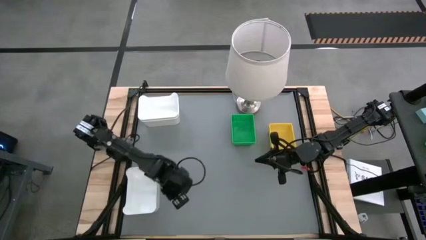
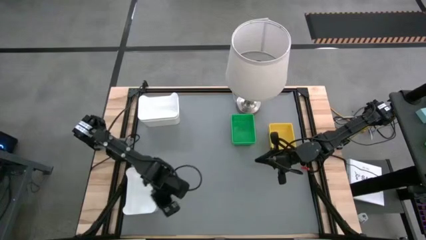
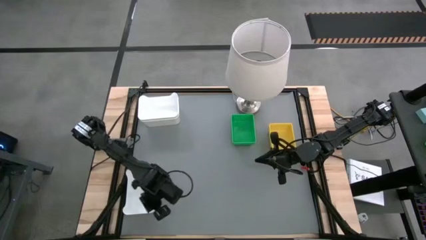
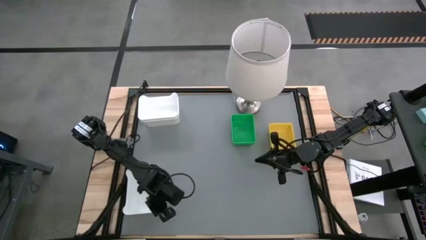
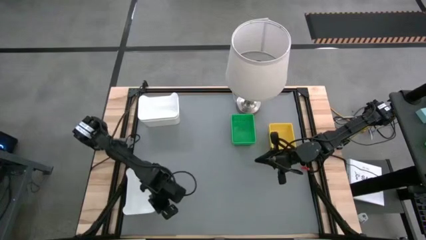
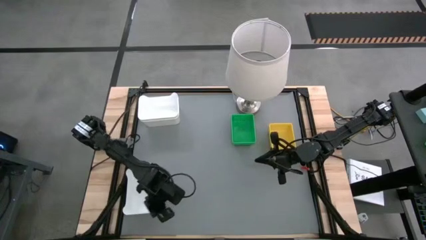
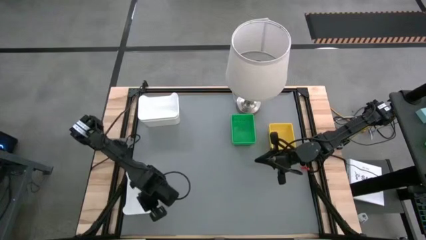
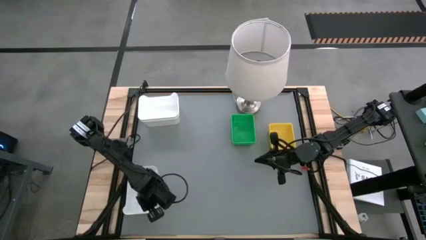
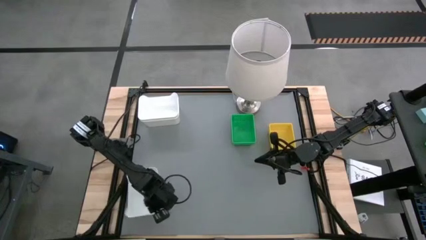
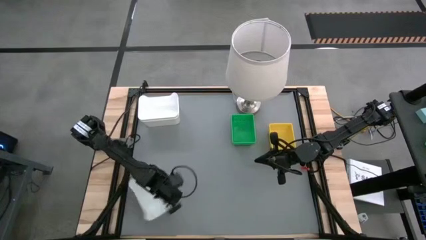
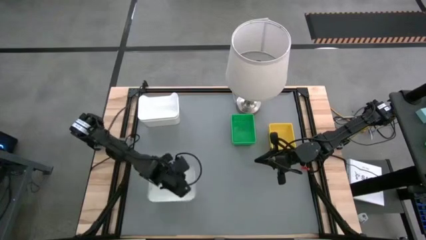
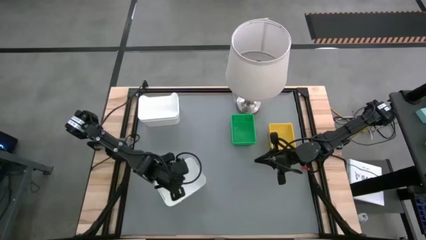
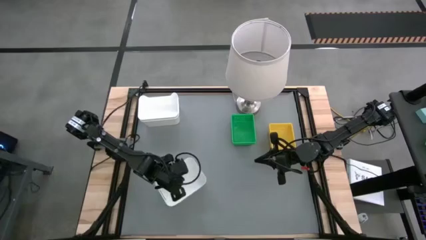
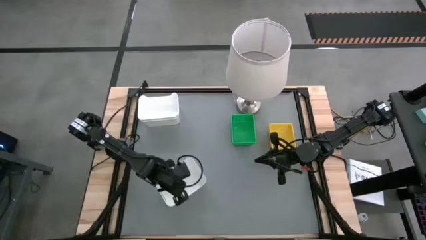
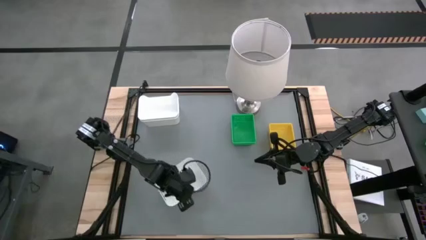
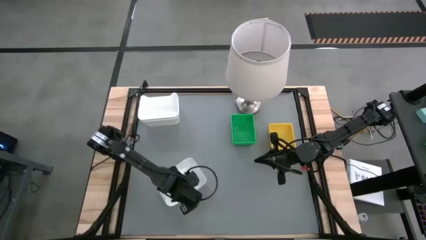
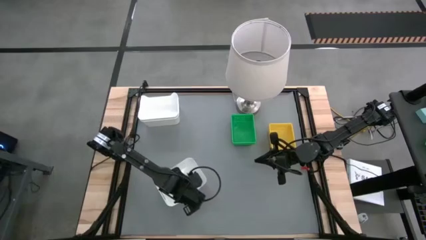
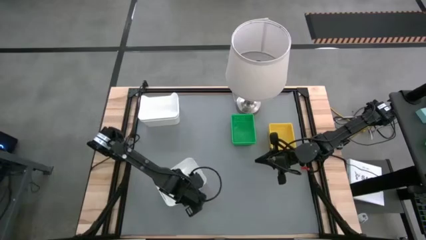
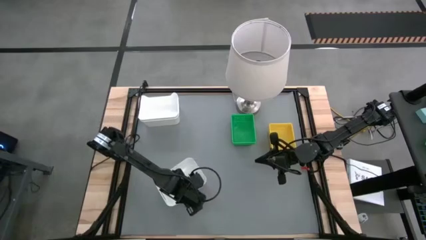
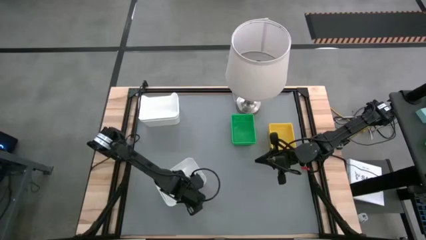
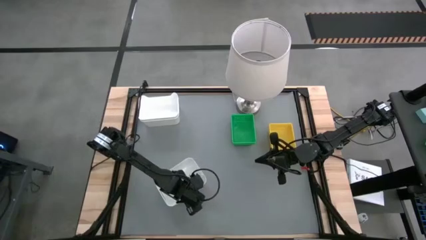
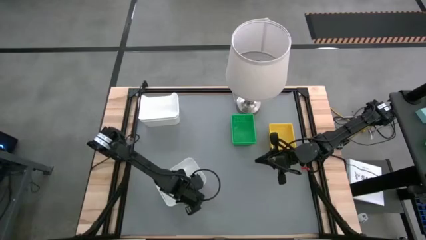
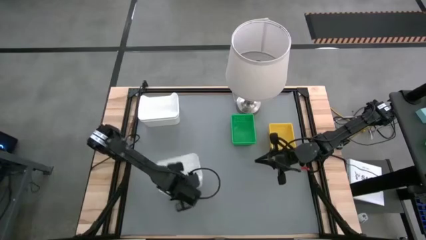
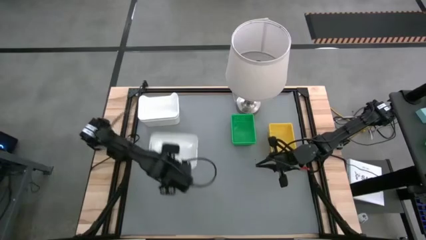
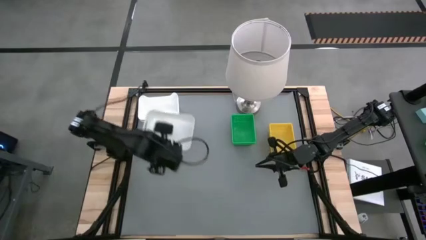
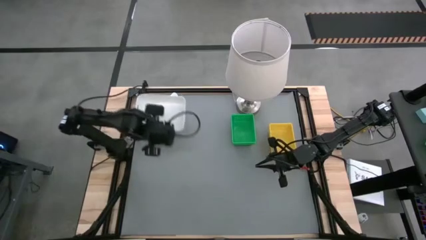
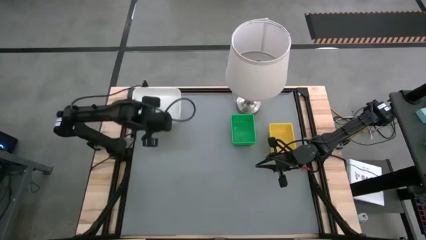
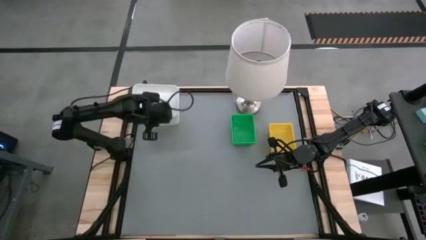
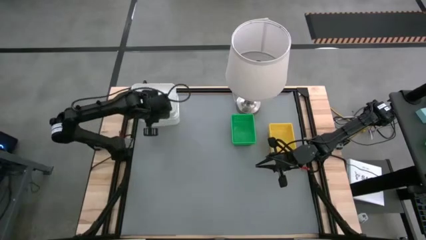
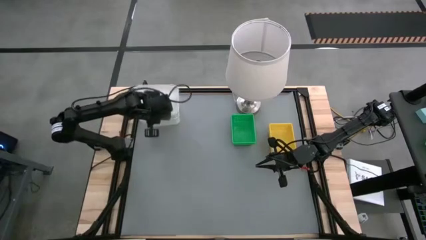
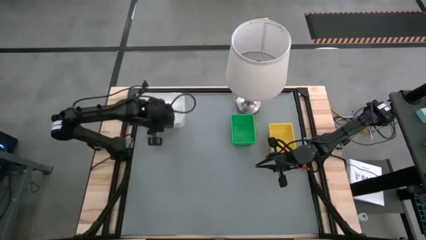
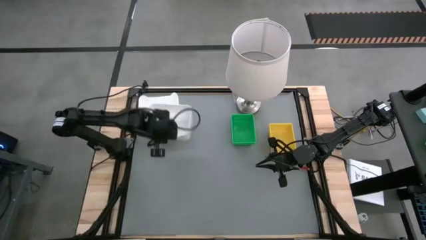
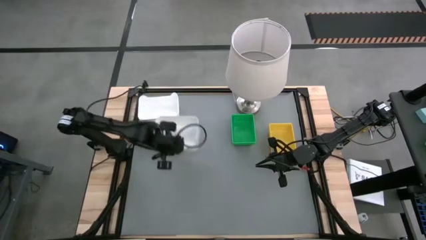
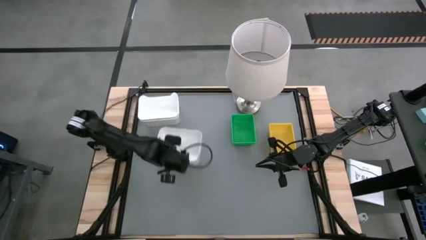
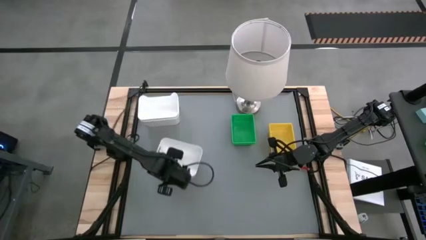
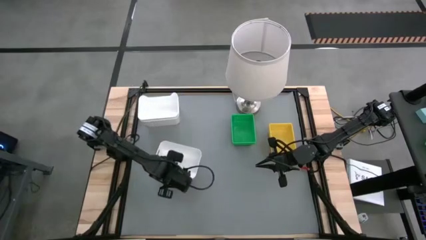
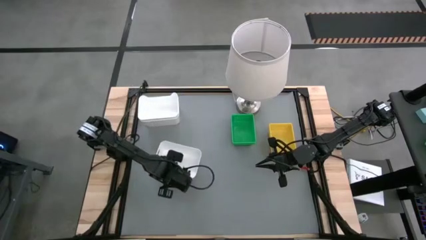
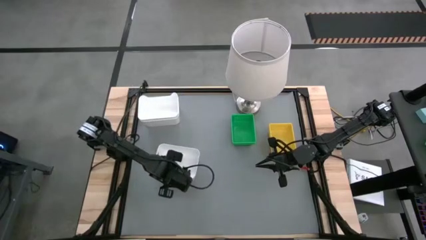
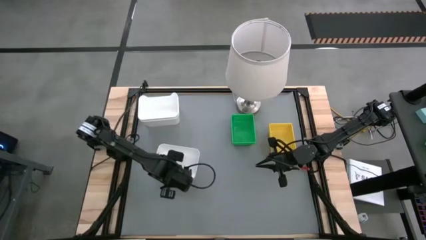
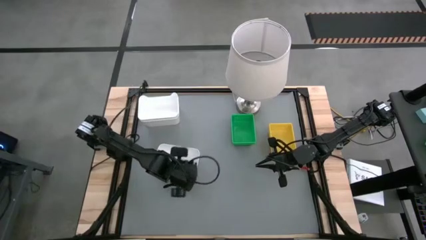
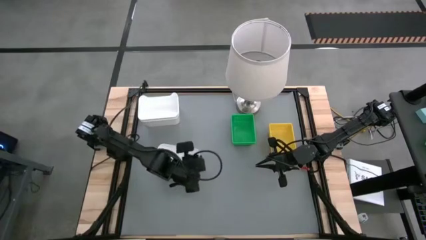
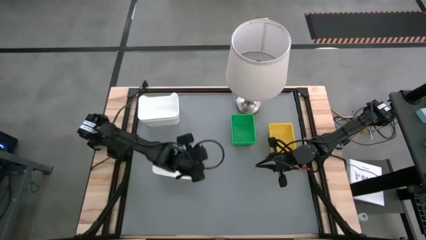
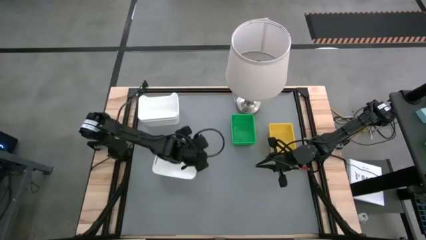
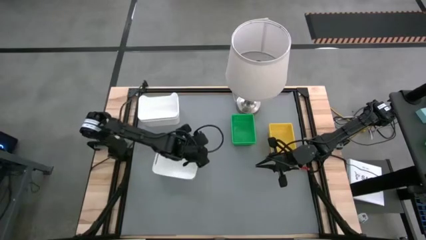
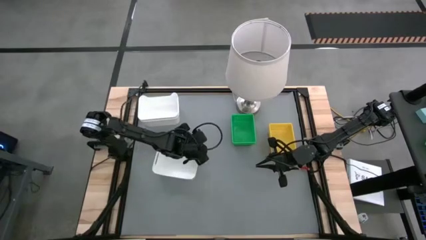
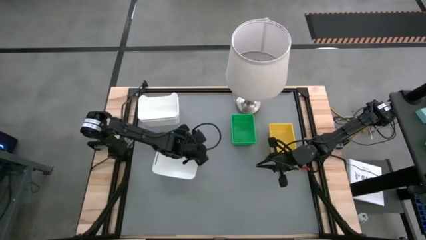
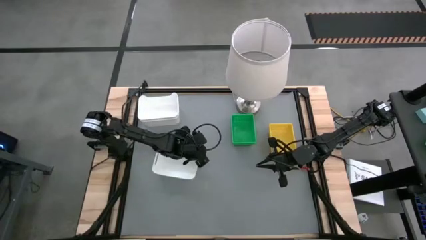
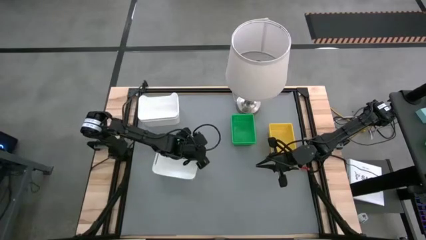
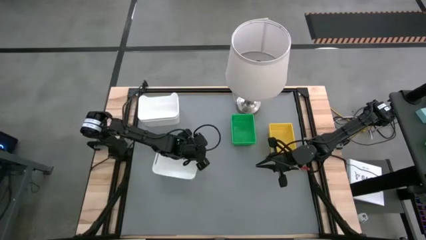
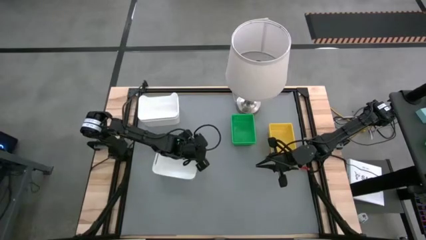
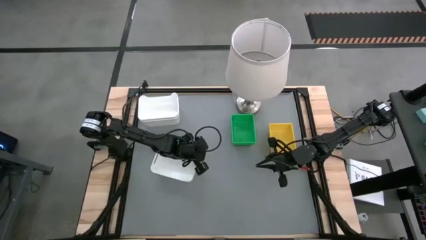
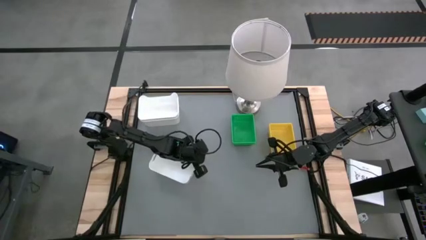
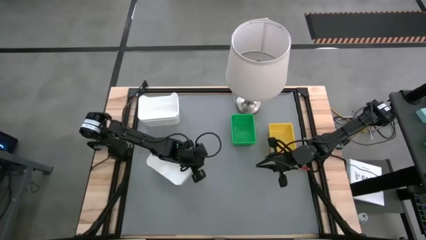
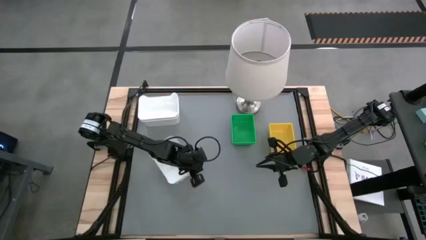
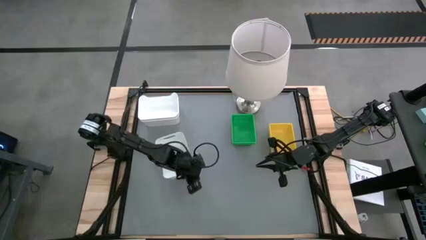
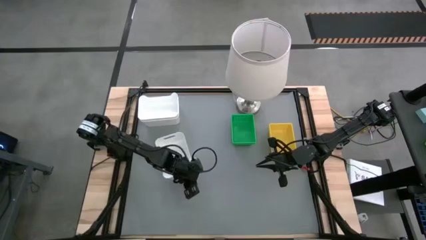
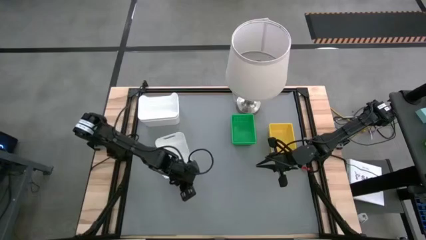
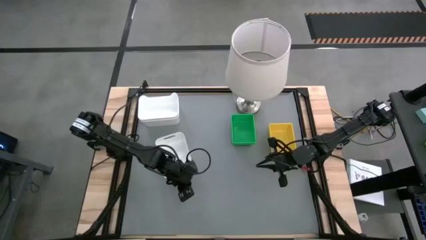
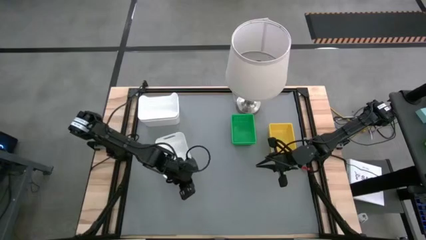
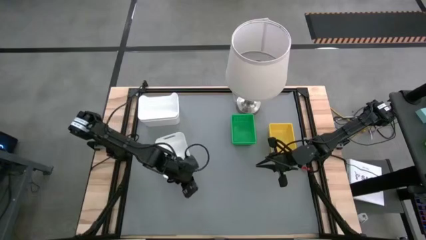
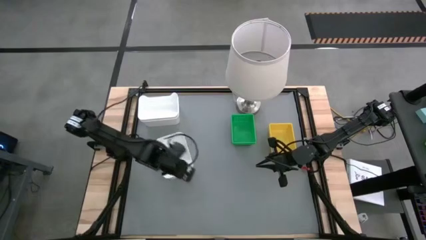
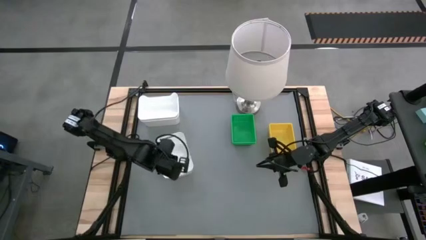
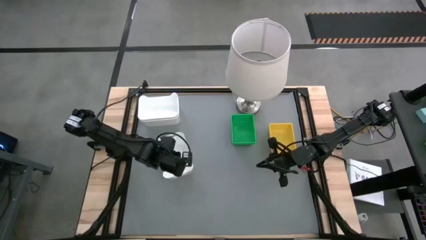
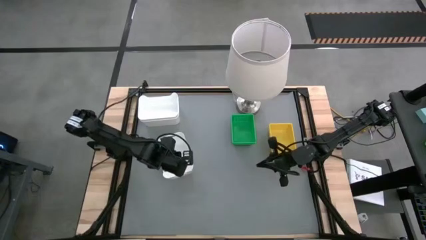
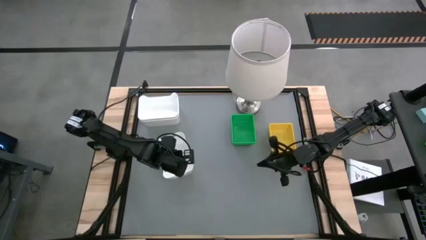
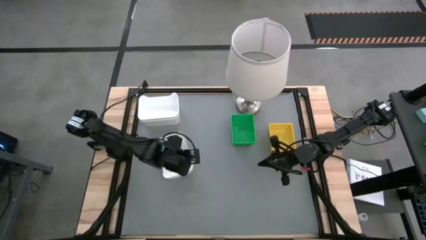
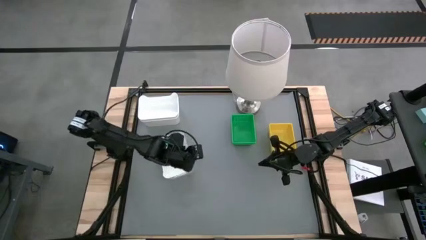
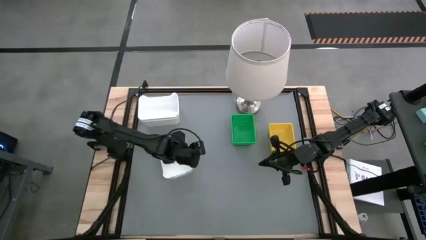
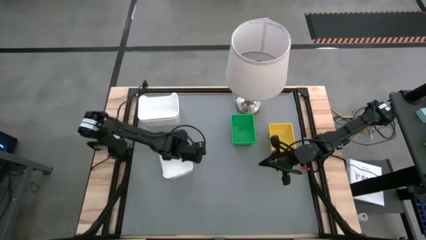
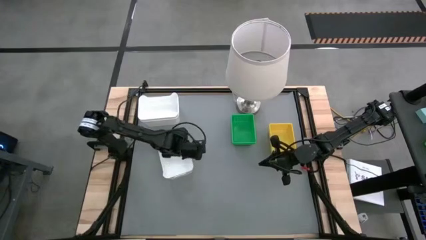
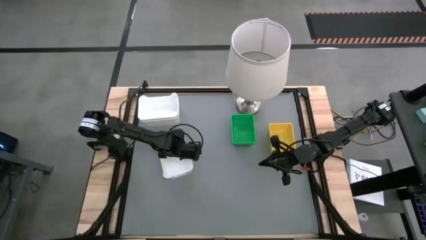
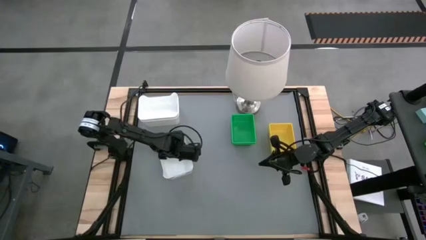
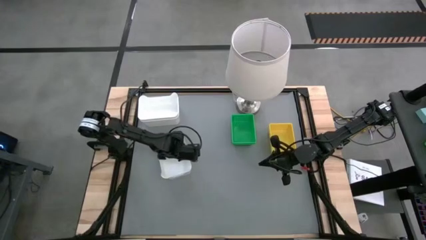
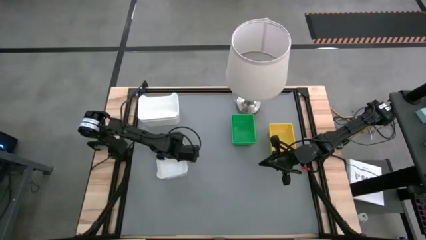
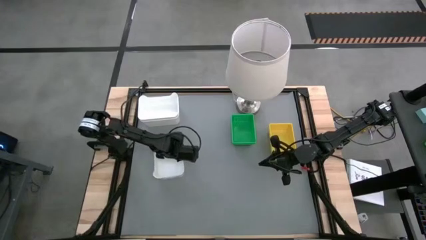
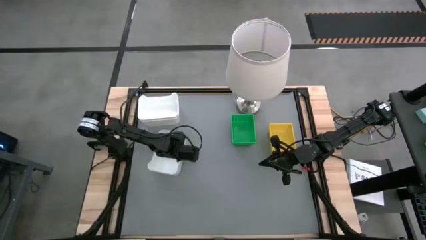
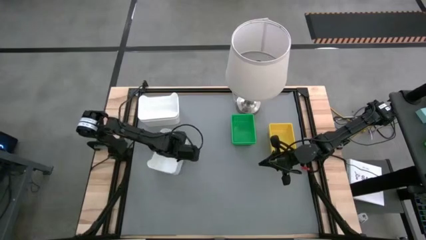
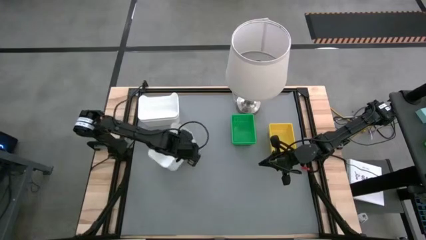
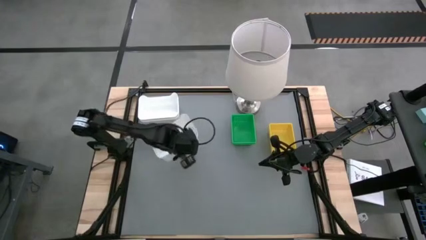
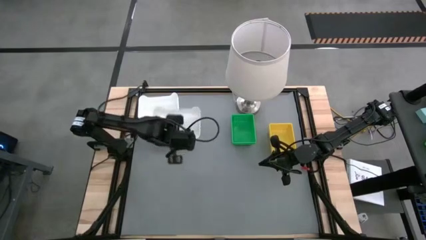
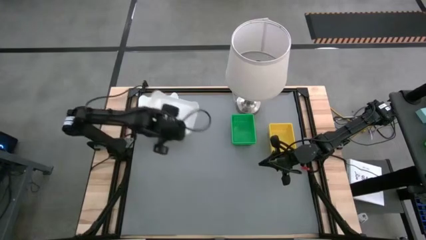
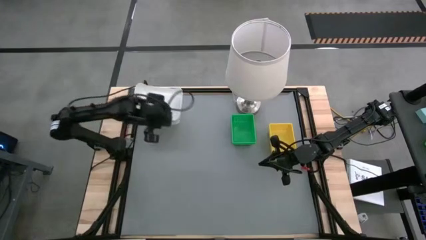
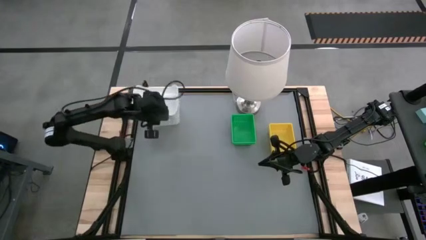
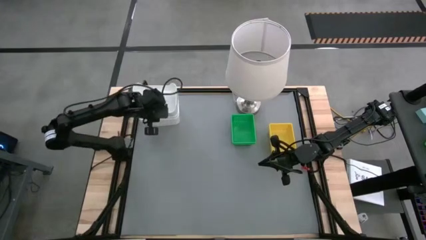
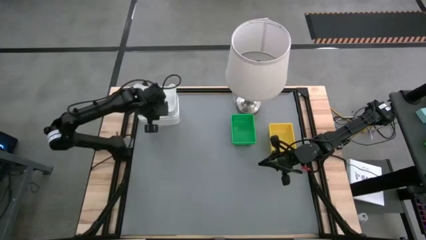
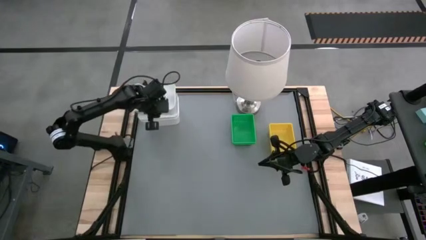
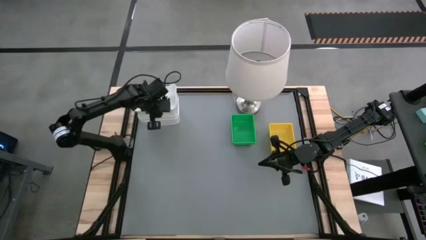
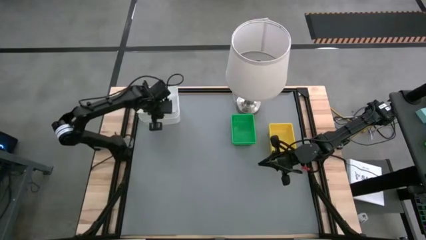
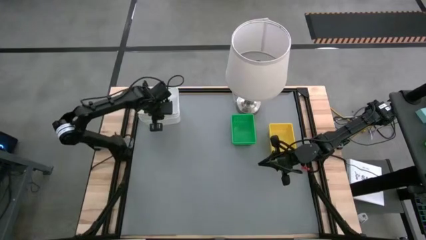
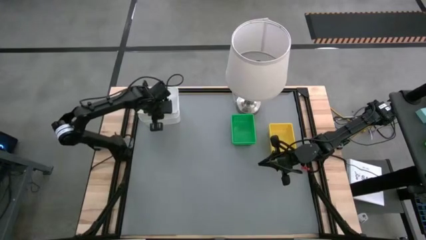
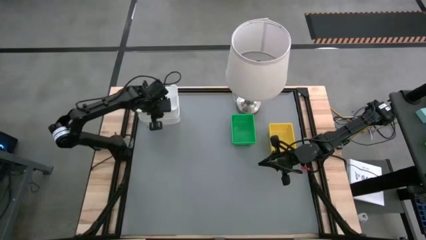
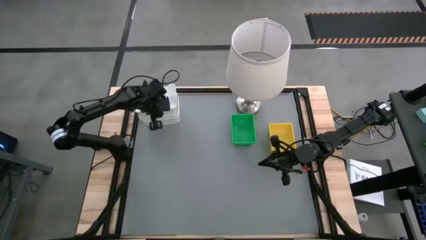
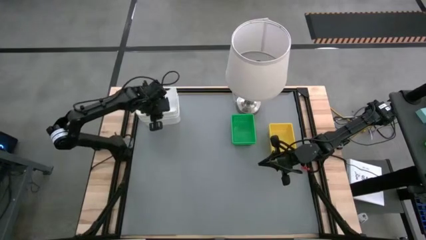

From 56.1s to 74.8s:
Stack the bottom white bin on the white bins
